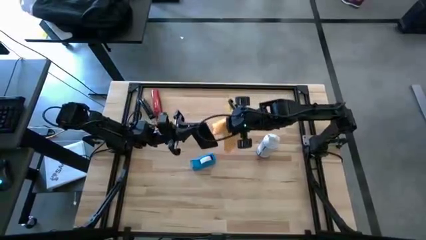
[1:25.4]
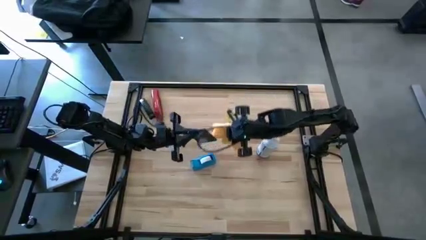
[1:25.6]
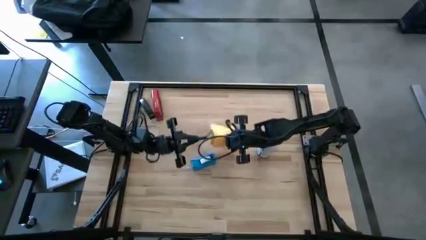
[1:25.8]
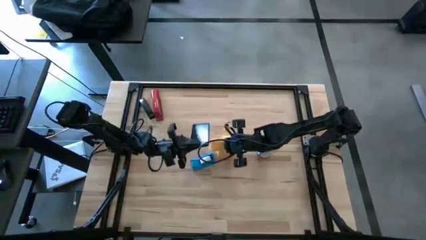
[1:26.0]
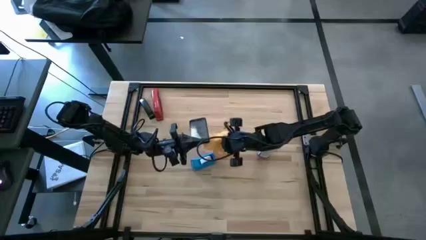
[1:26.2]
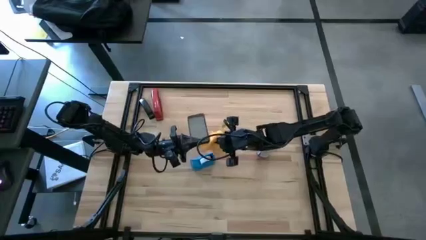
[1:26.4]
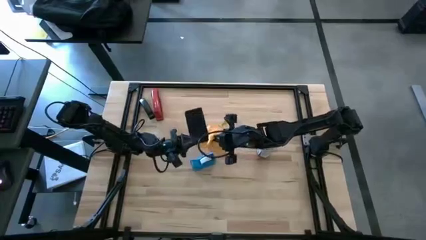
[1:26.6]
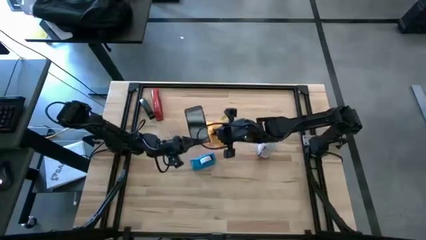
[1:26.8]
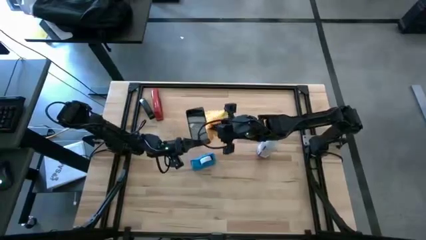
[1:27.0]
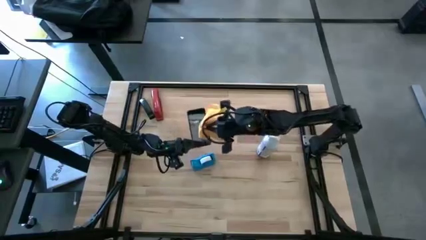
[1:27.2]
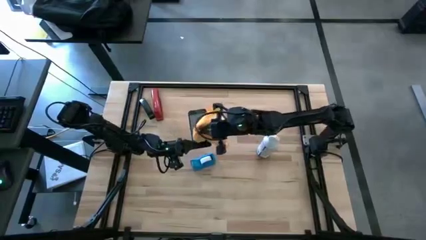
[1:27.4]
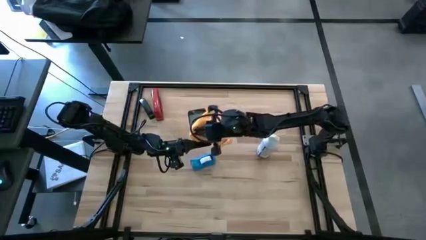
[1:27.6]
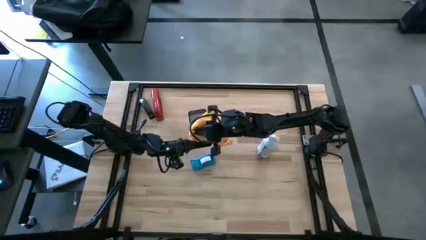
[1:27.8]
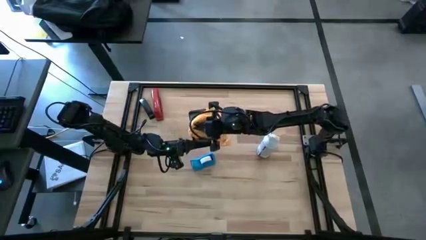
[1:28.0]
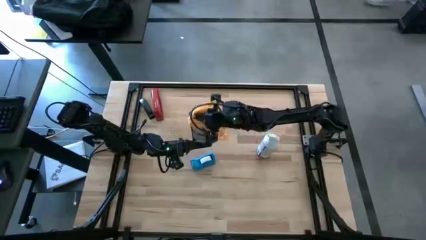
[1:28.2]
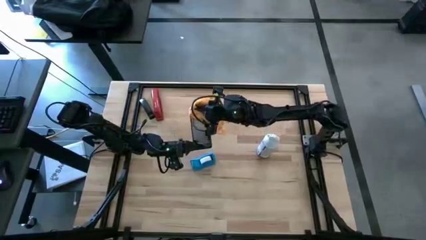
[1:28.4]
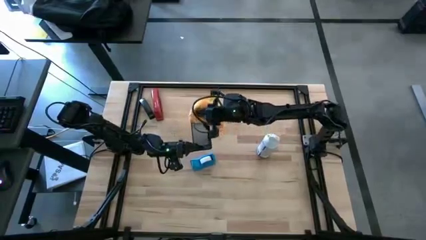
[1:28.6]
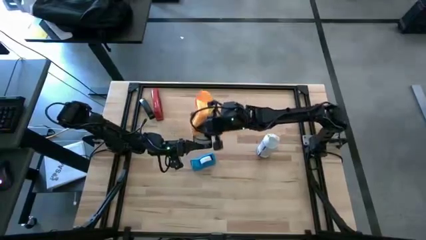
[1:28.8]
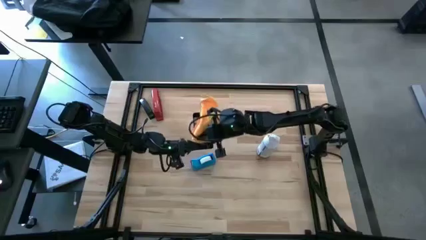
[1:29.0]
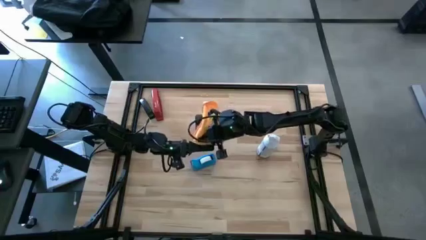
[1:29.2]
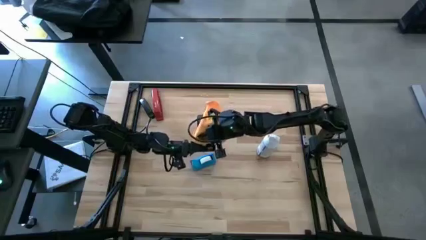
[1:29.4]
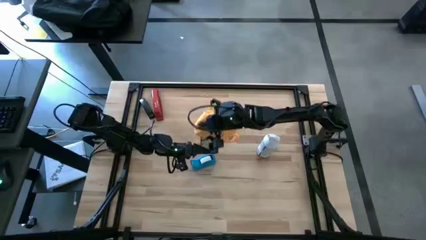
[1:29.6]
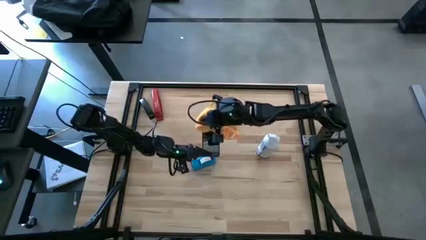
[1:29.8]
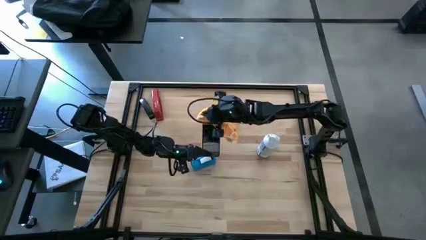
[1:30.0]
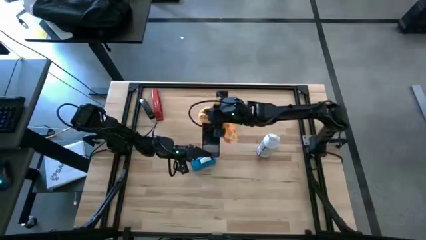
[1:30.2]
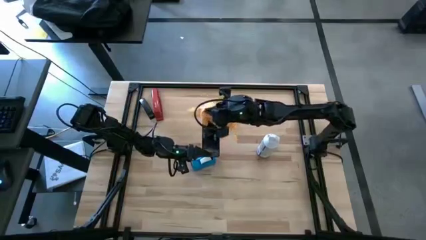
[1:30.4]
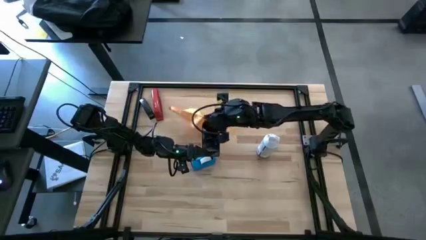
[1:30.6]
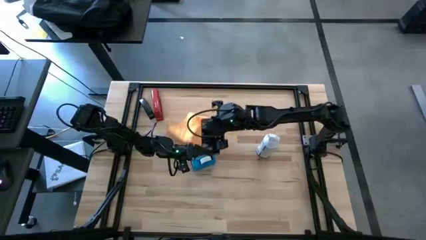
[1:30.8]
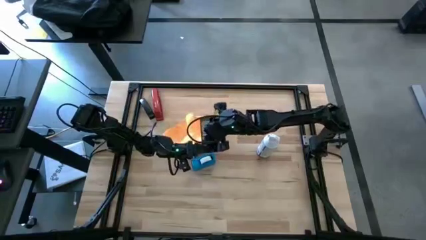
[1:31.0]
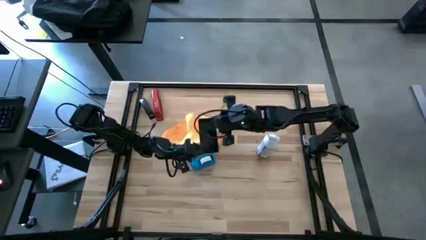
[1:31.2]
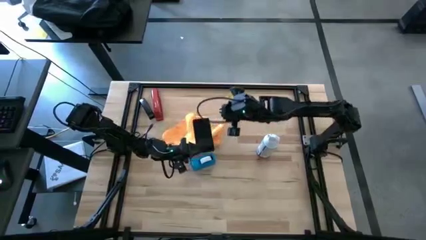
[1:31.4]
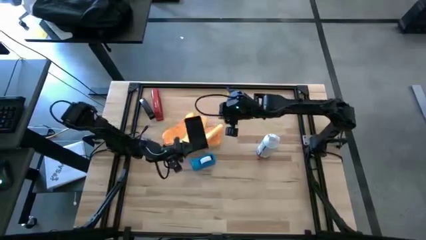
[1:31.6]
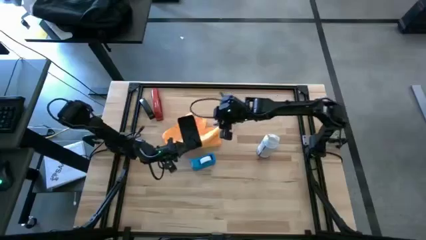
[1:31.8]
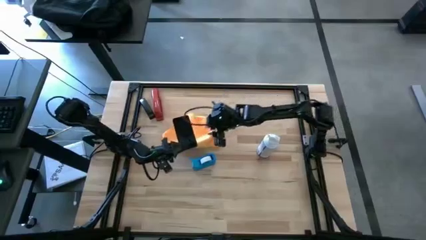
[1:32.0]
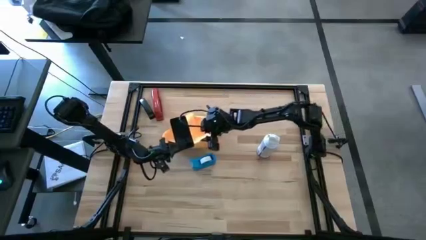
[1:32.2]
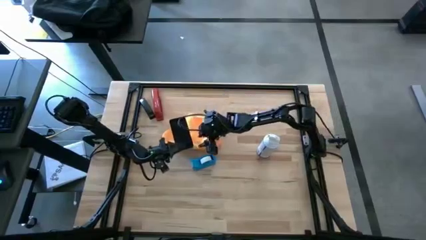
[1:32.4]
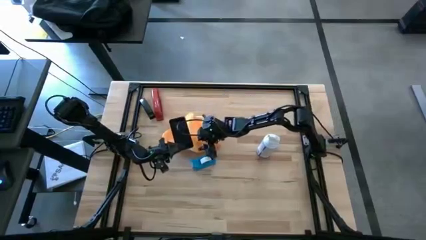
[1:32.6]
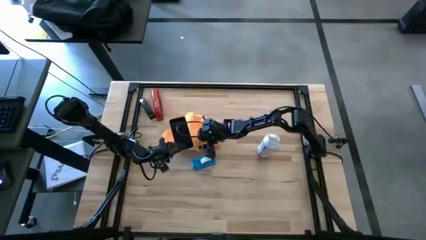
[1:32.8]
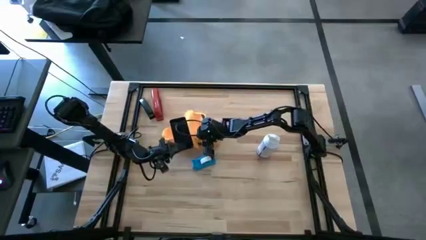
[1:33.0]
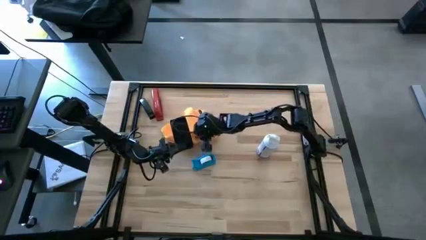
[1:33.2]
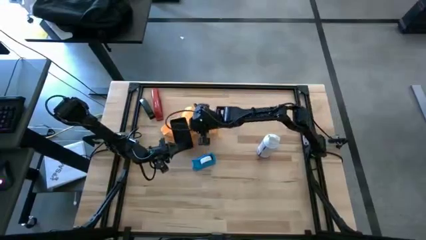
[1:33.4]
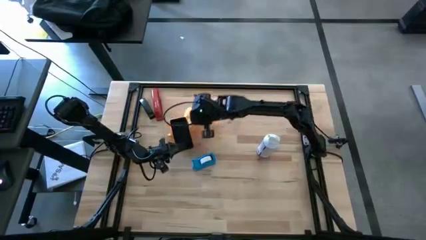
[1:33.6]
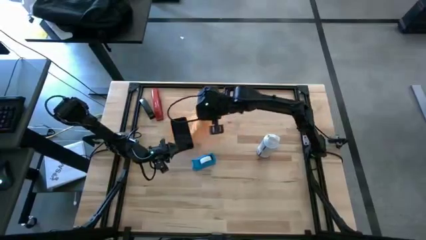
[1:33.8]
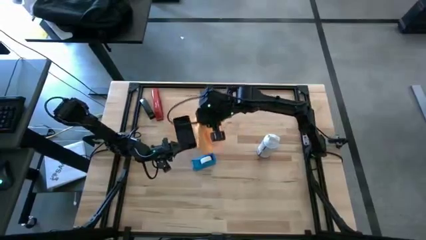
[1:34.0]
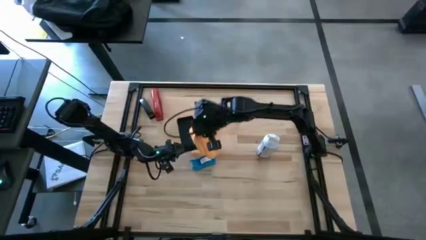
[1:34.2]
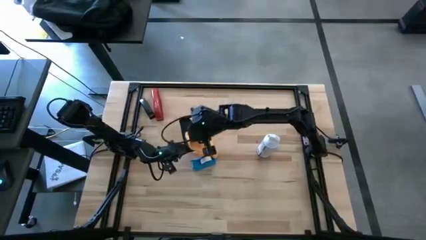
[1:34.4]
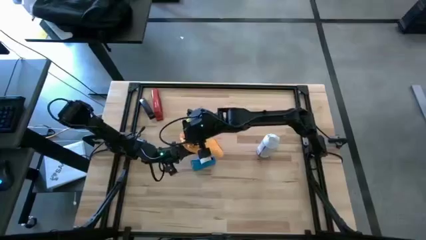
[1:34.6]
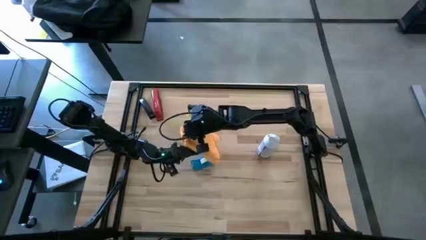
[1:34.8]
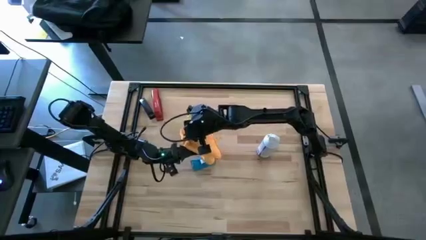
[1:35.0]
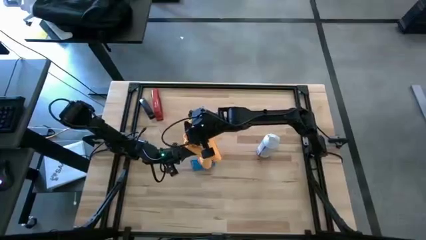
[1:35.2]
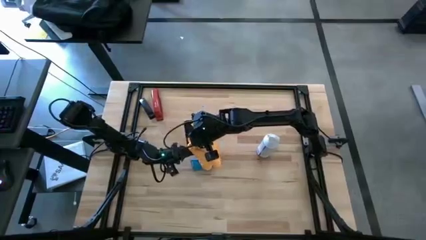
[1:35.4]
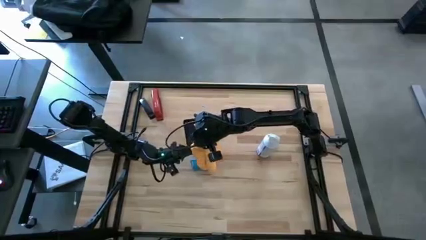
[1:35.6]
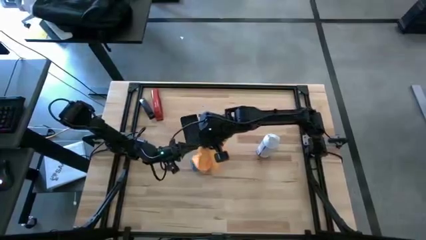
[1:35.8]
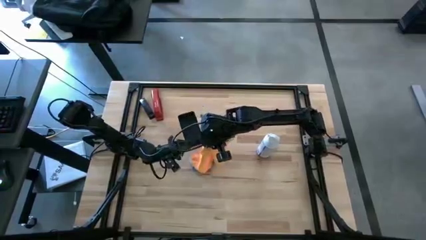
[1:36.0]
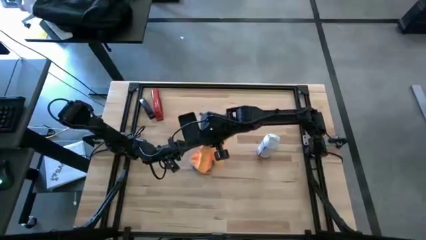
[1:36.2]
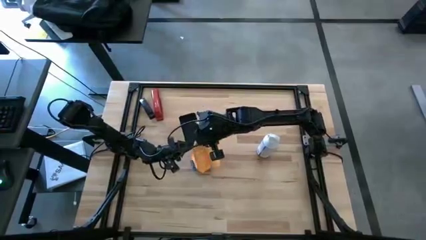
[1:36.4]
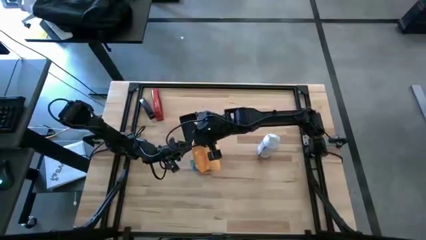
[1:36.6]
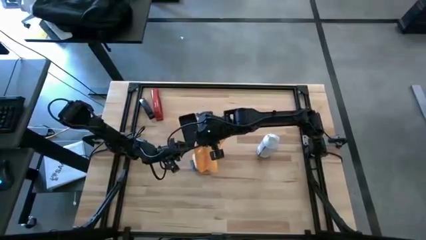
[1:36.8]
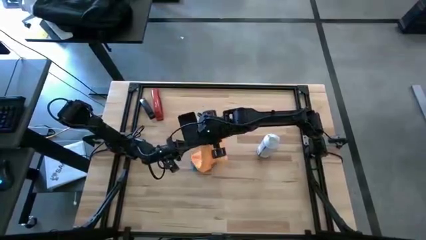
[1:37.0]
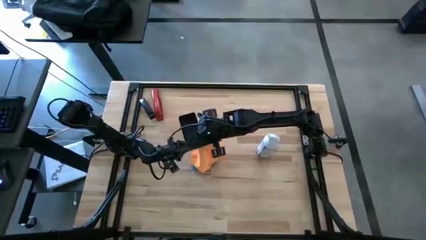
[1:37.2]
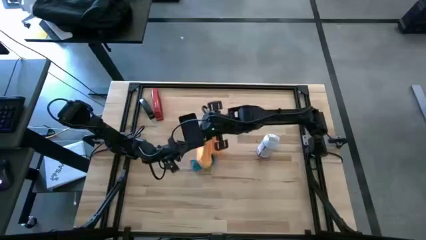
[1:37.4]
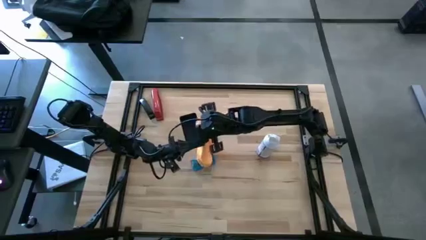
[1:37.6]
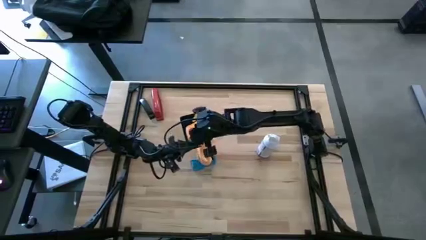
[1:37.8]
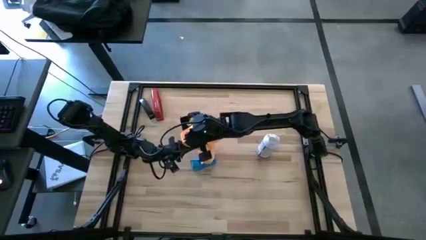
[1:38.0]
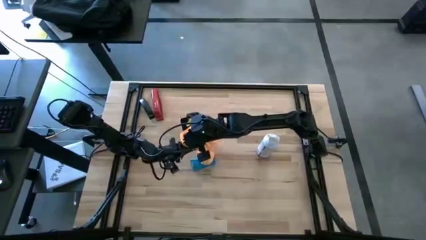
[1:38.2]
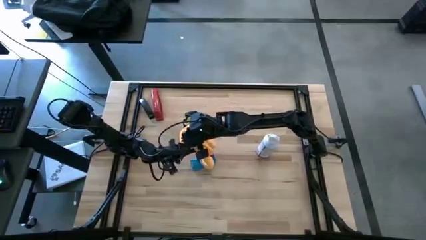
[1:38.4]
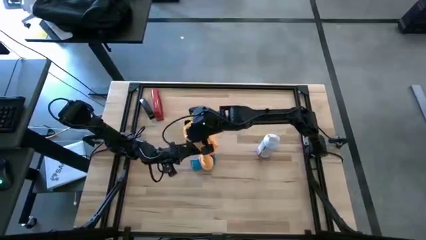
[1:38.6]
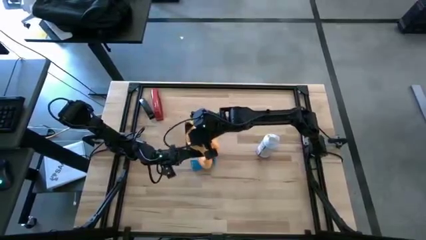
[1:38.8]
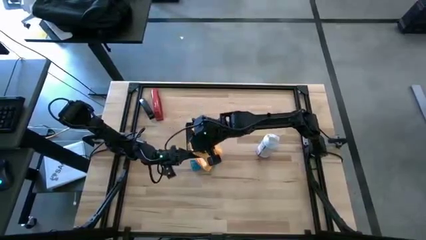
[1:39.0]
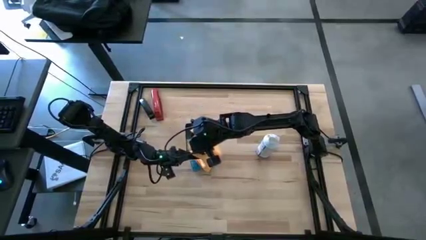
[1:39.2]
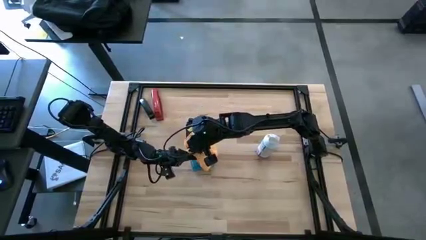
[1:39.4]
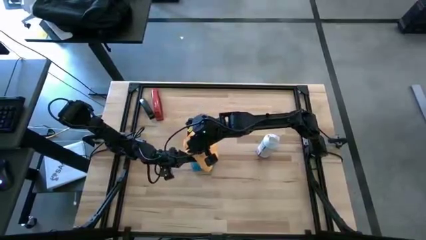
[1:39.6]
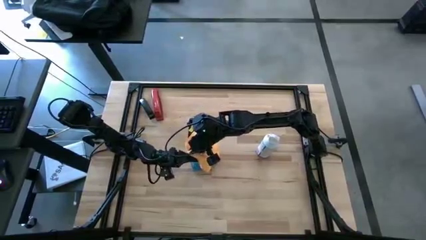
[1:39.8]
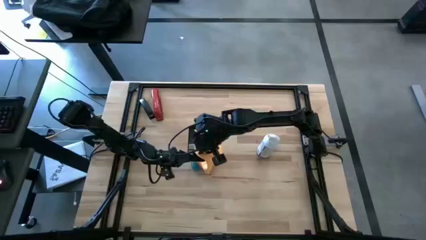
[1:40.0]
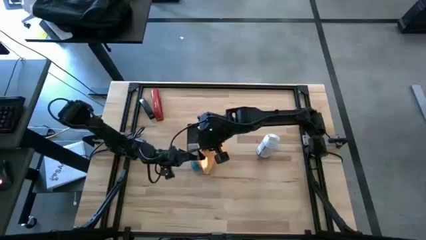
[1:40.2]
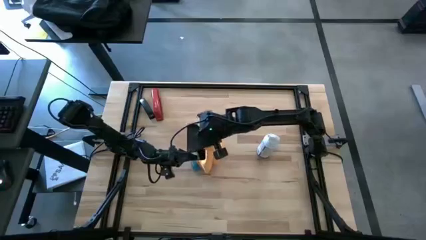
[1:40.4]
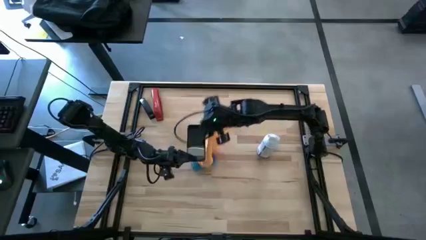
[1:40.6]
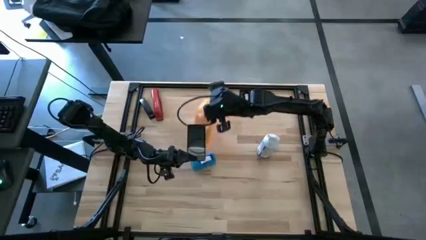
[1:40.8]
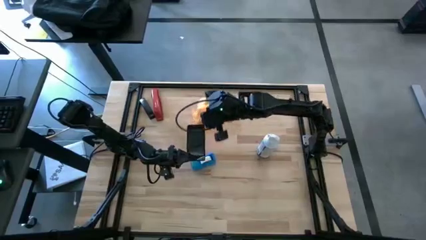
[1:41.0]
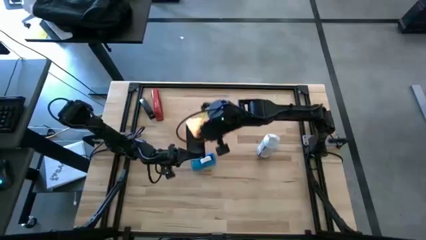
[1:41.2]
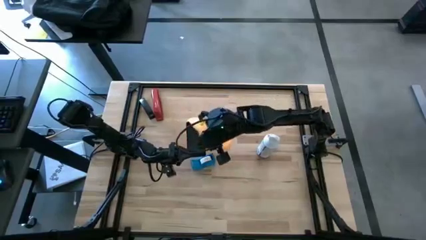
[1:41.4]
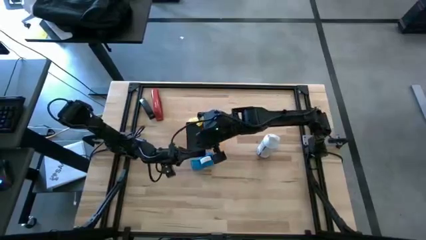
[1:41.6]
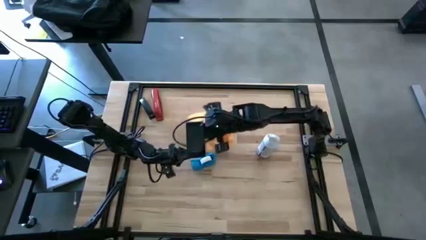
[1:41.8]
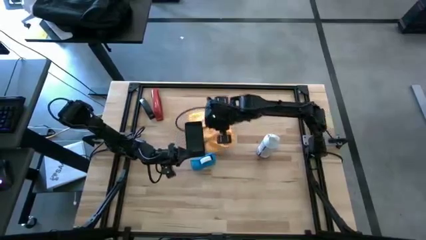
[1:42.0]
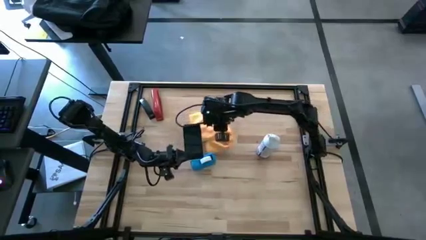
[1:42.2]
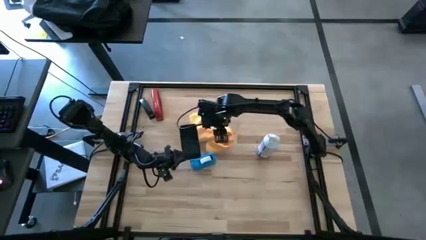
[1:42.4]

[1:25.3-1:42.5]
Task: Apply microfiber cloth
Wipe the front of the cellphone with an orange microfiber cloth
